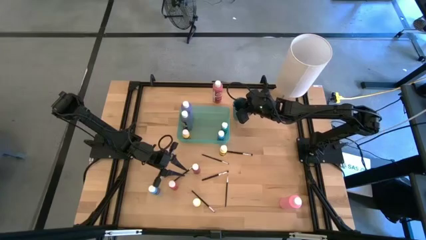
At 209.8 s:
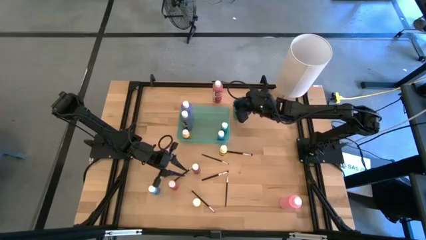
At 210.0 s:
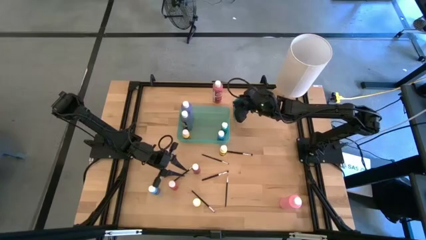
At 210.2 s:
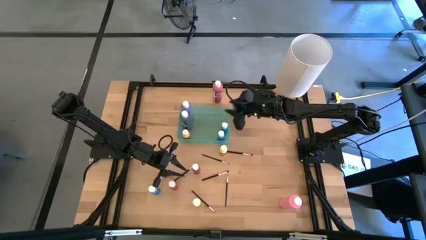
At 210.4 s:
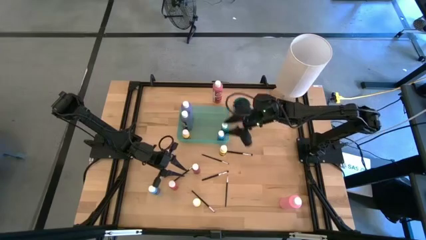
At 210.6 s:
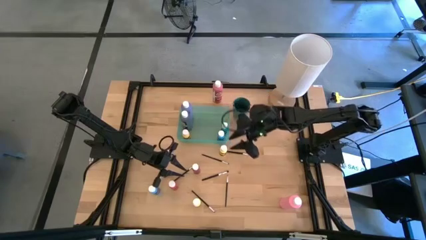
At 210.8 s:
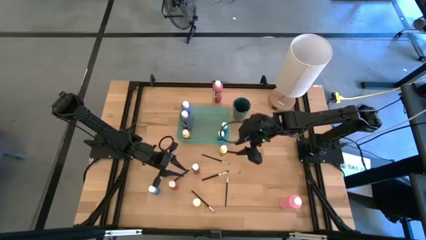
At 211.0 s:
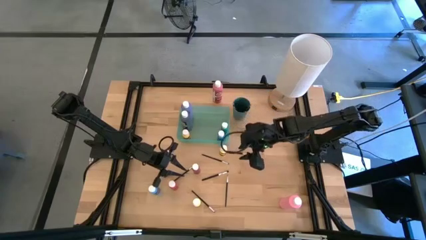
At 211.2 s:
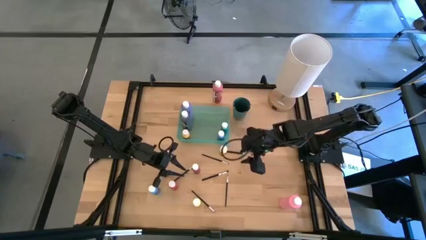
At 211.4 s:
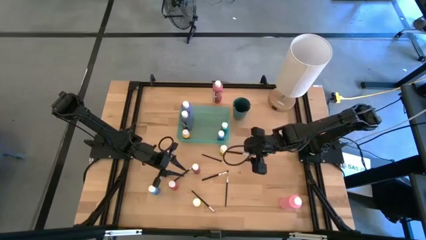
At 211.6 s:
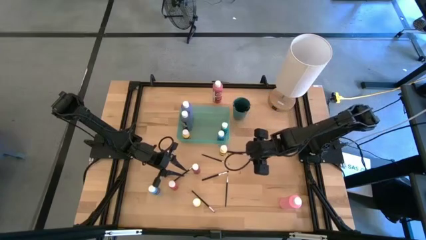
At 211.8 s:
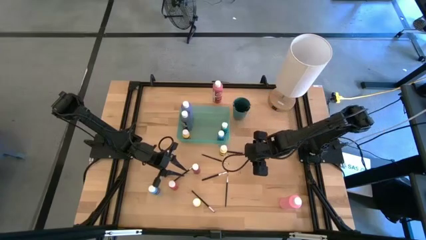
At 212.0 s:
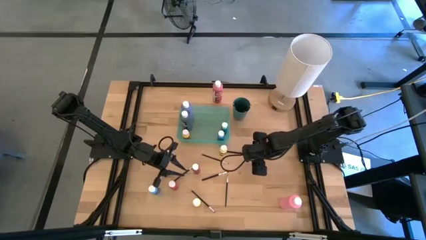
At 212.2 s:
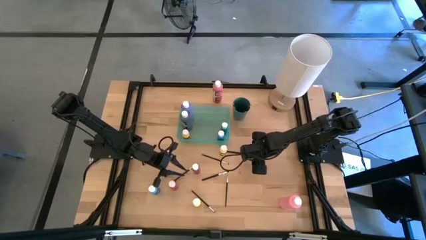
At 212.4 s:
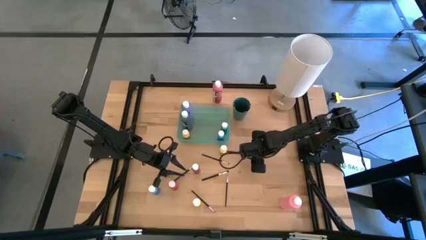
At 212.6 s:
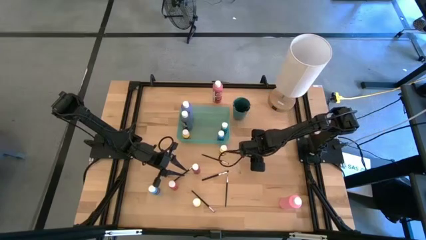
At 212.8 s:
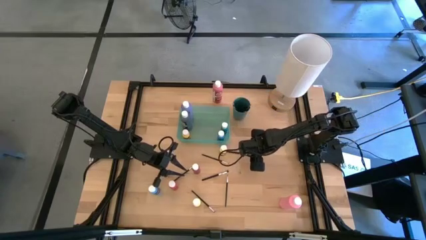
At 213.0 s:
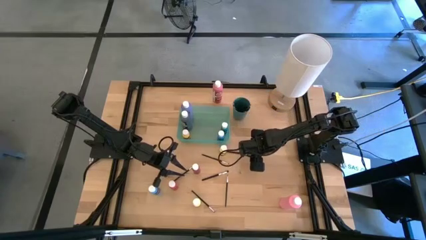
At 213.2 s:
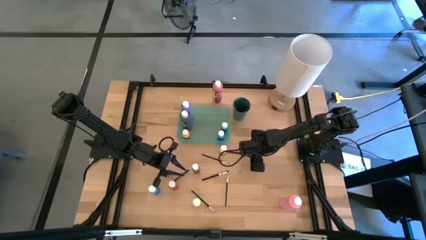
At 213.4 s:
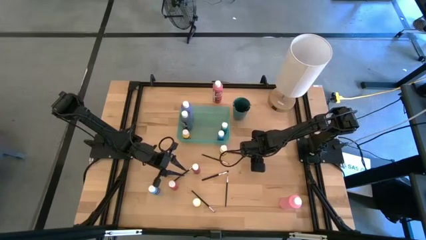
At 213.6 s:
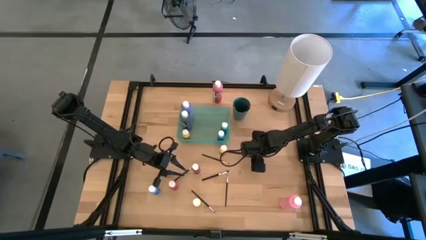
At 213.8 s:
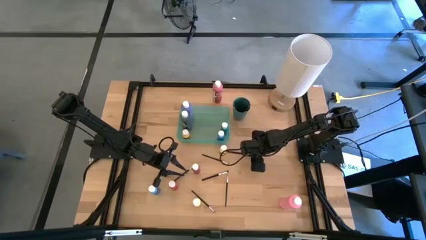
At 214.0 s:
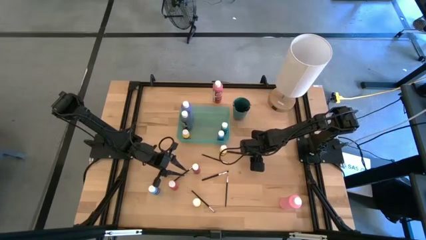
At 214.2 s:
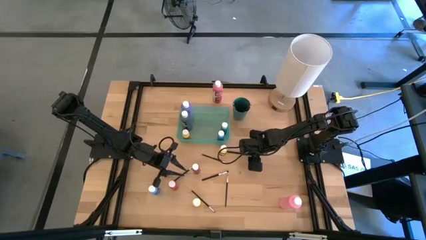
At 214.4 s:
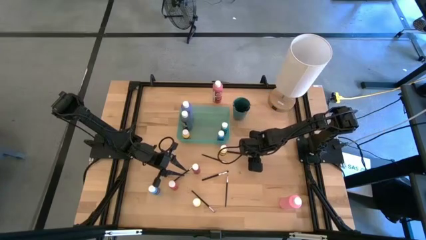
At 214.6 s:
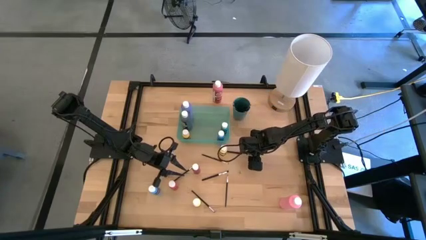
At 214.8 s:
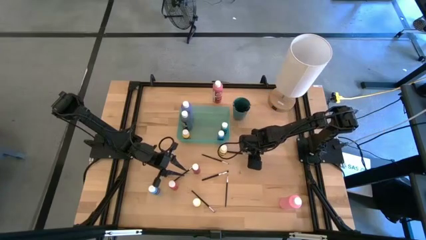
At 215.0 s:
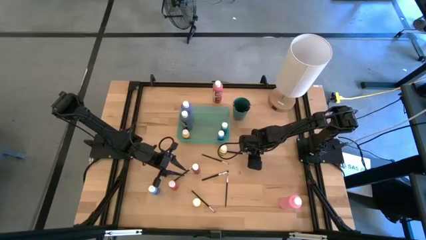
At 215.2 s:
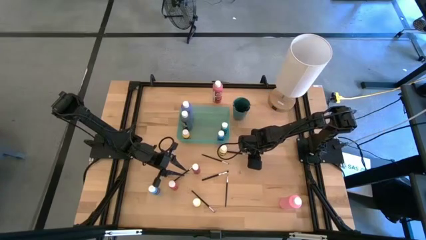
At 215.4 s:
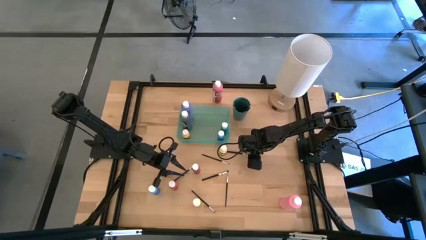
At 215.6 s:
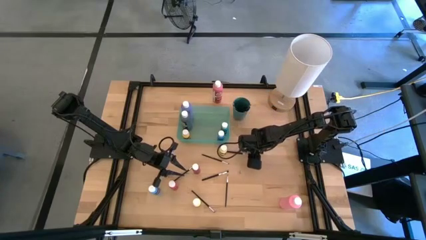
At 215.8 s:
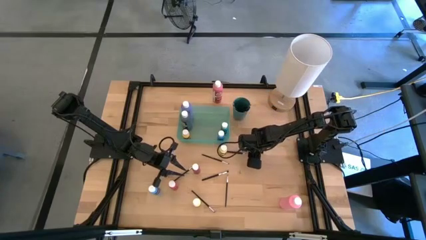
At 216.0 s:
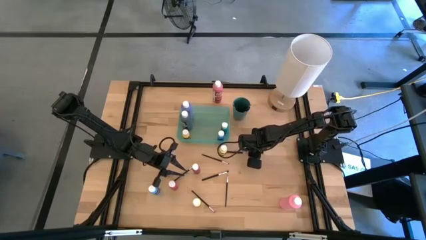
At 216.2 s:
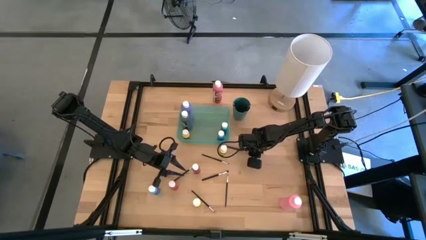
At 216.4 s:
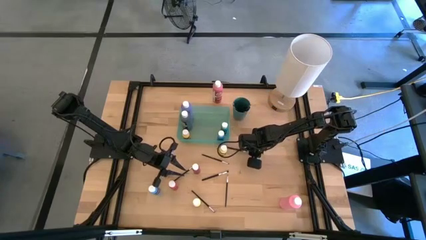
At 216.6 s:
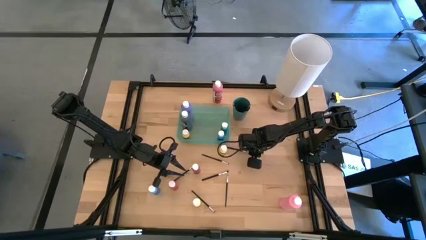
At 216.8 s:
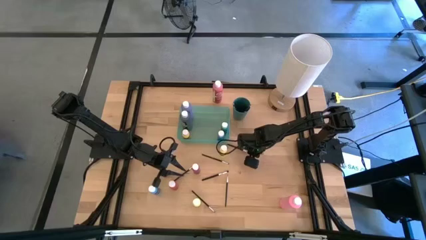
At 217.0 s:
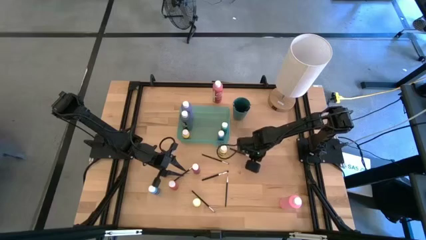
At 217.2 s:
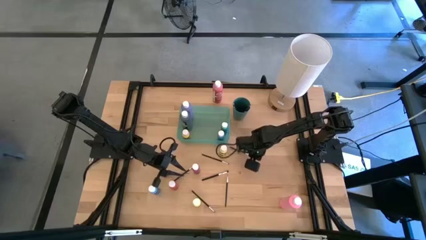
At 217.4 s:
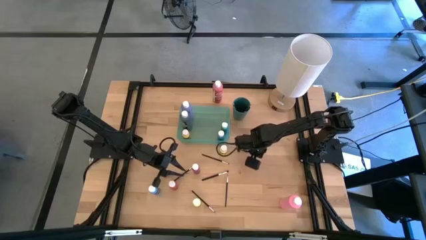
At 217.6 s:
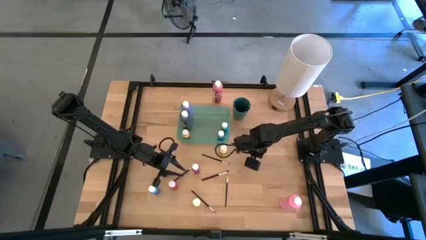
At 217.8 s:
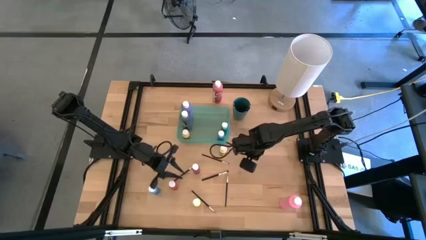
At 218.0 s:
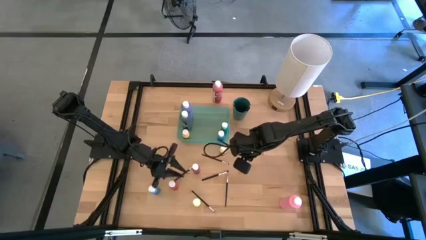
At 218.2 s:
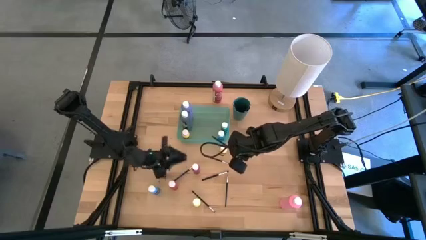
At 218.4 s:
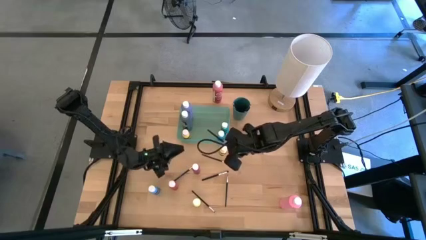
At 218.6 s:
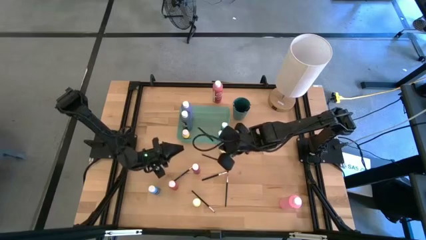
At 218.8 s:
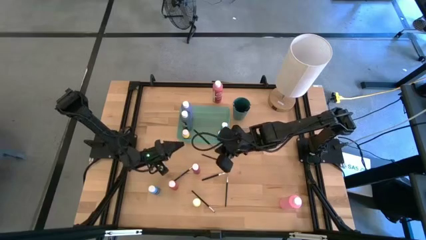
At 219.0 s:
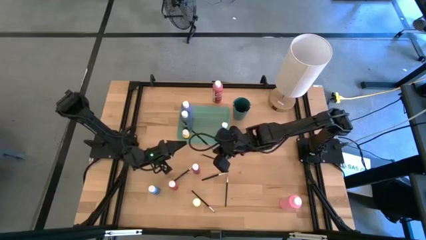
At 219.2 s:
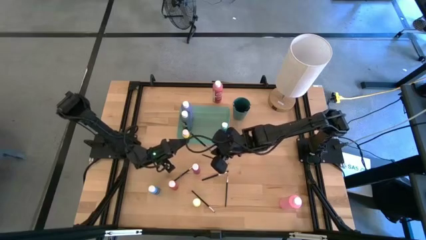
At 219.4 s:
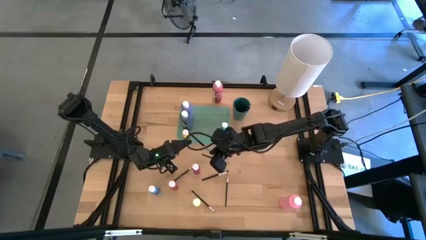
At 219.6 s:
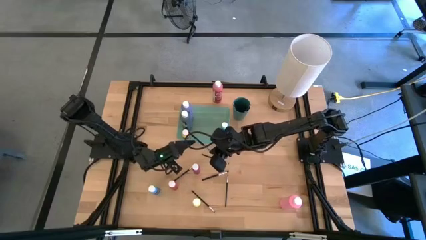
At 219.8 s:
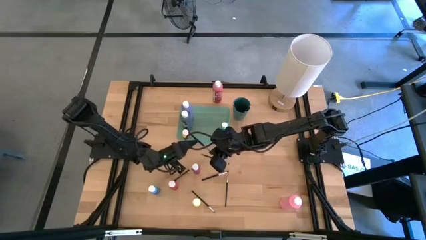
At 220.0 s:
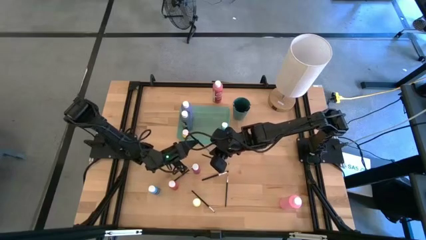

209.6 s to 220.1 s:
Task: Pick & Place Paint Supplies
Put the black paint brush into the dark green cup
